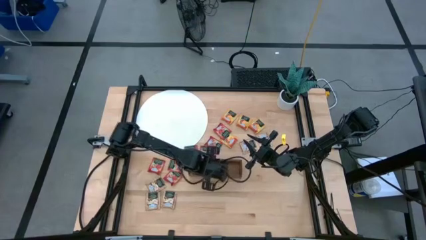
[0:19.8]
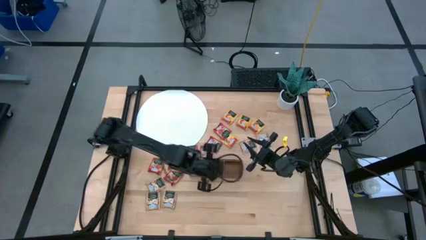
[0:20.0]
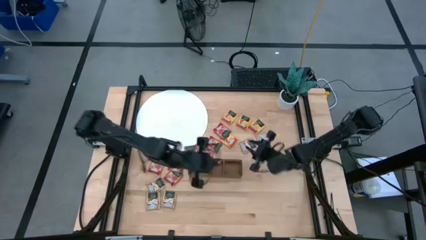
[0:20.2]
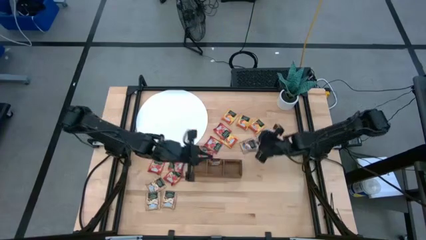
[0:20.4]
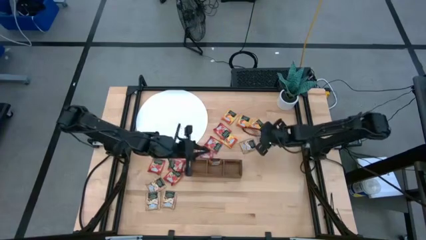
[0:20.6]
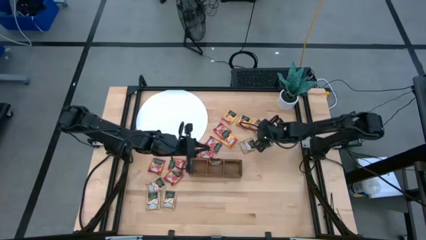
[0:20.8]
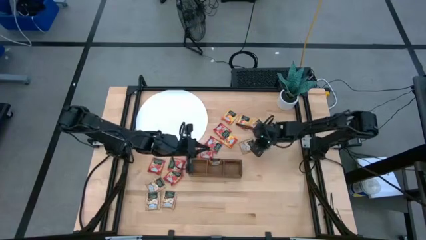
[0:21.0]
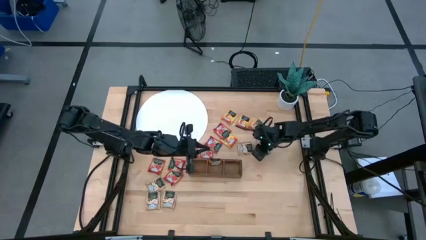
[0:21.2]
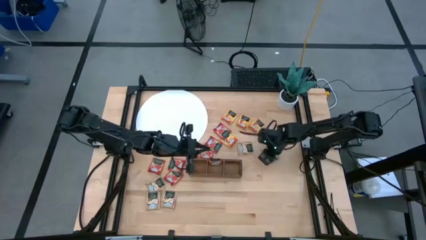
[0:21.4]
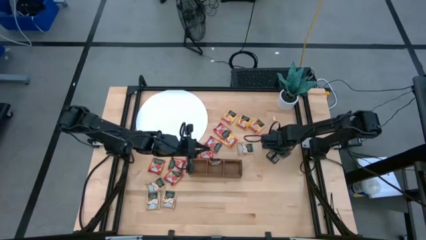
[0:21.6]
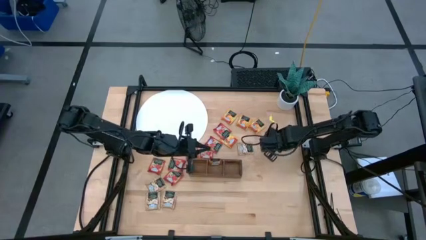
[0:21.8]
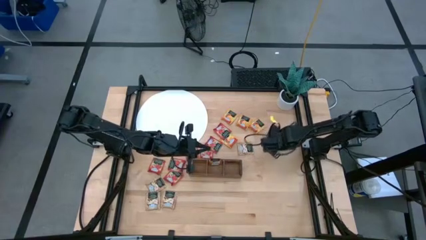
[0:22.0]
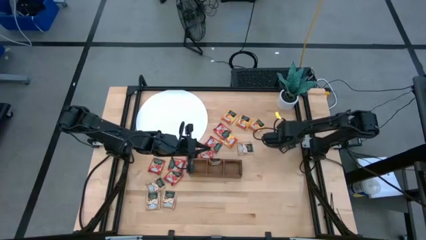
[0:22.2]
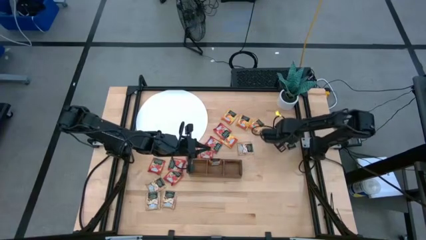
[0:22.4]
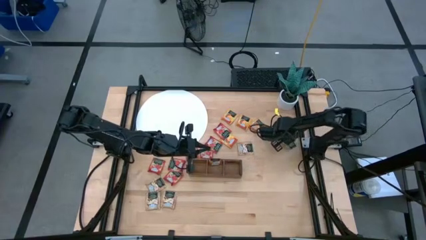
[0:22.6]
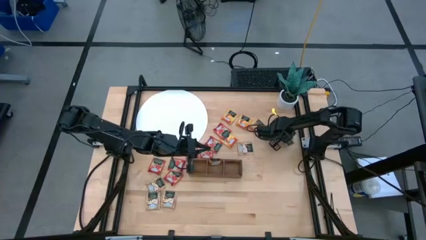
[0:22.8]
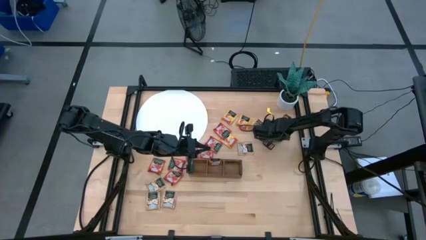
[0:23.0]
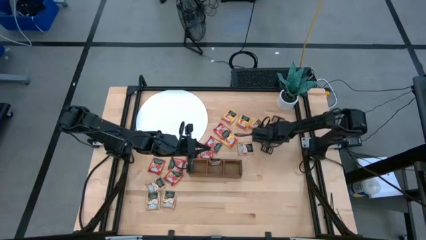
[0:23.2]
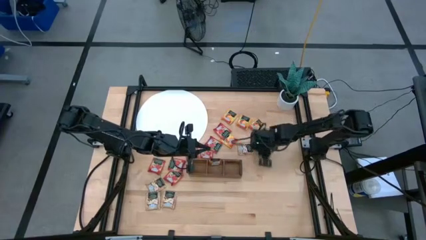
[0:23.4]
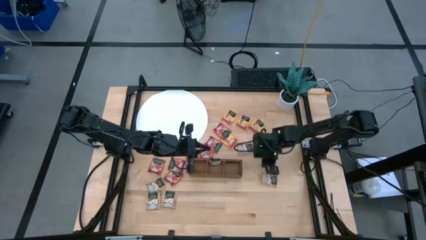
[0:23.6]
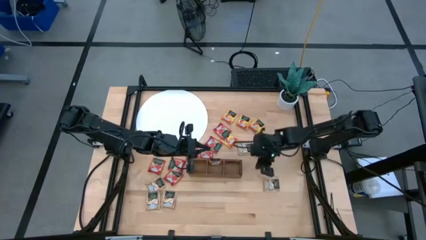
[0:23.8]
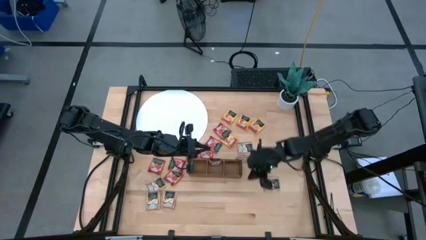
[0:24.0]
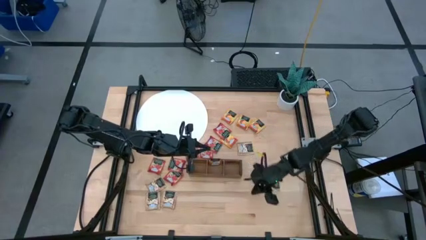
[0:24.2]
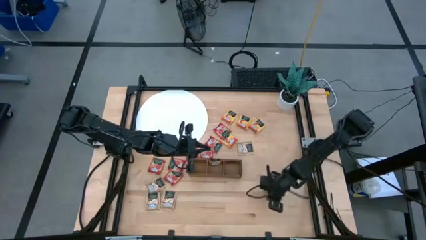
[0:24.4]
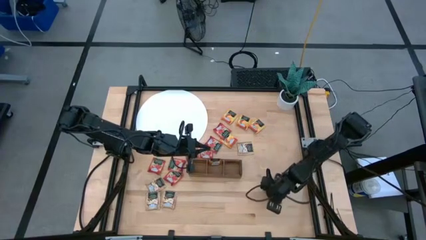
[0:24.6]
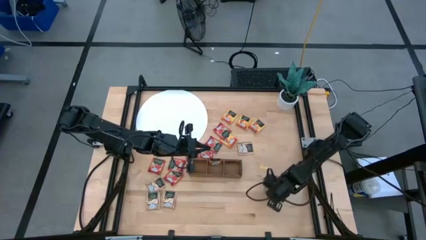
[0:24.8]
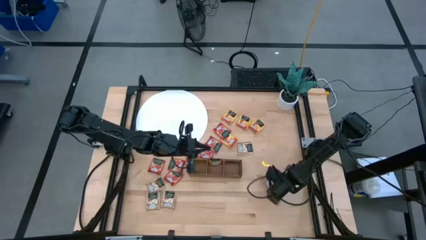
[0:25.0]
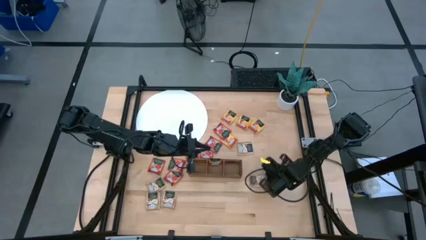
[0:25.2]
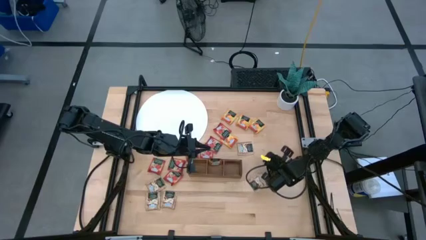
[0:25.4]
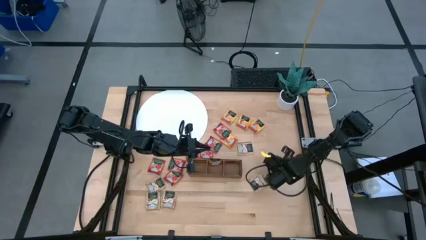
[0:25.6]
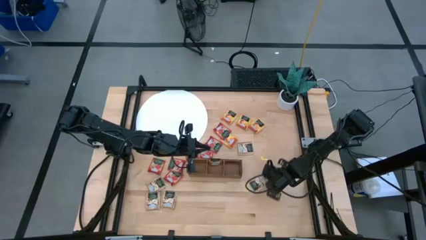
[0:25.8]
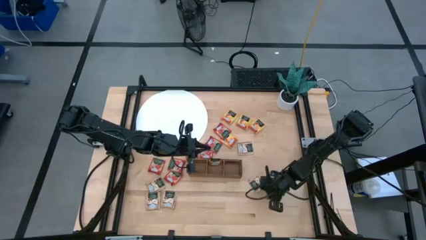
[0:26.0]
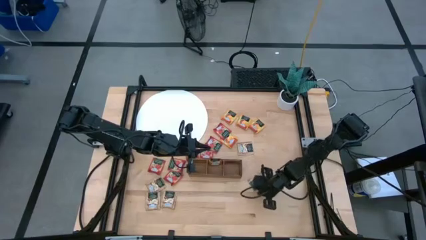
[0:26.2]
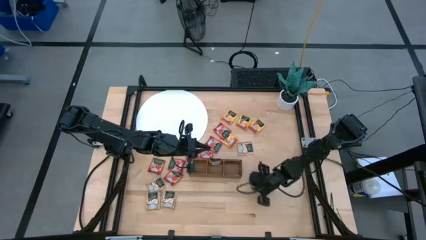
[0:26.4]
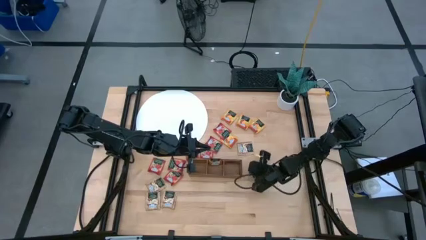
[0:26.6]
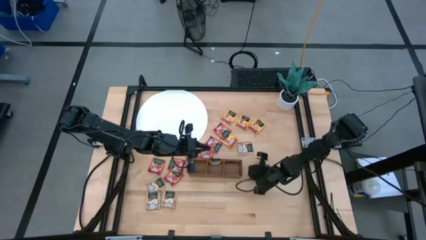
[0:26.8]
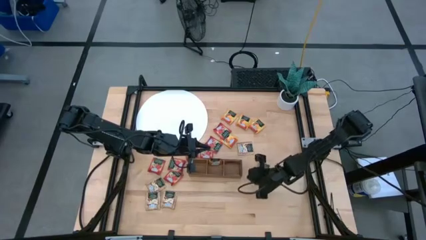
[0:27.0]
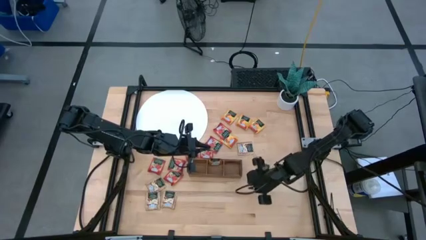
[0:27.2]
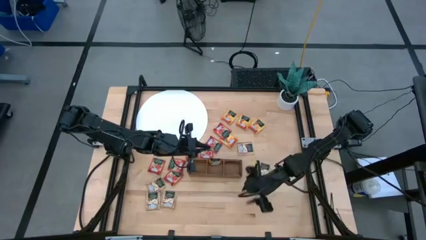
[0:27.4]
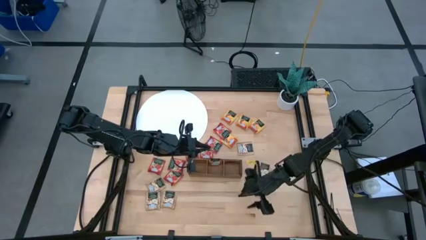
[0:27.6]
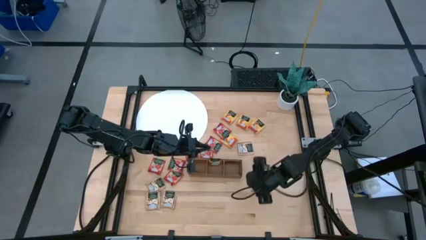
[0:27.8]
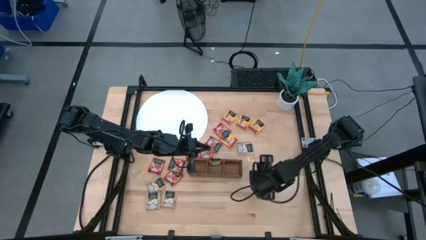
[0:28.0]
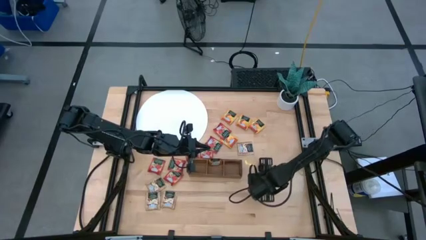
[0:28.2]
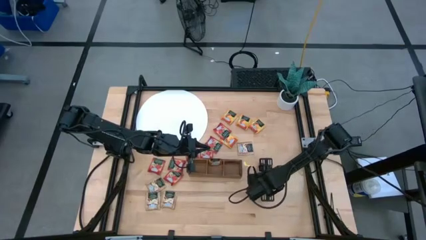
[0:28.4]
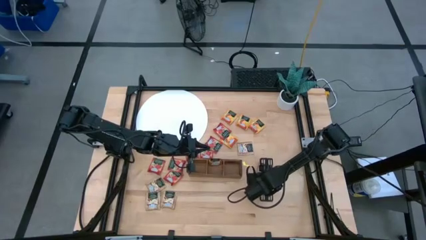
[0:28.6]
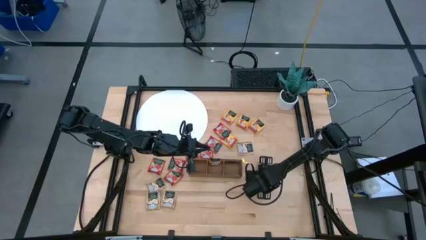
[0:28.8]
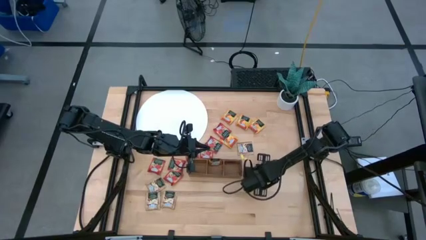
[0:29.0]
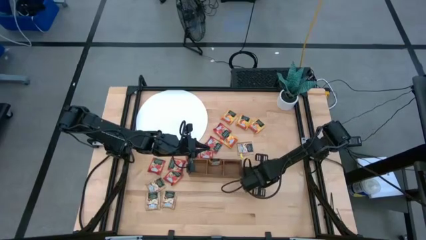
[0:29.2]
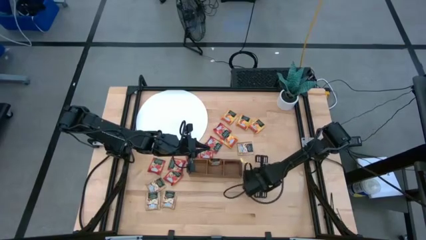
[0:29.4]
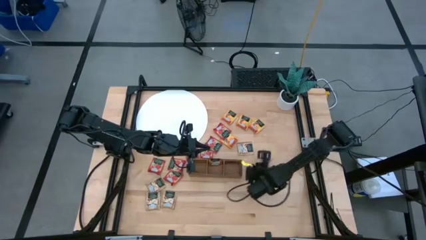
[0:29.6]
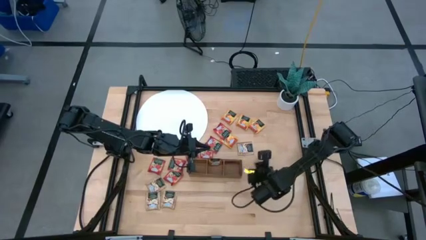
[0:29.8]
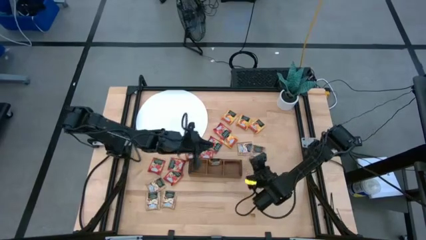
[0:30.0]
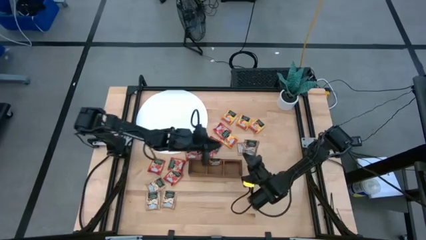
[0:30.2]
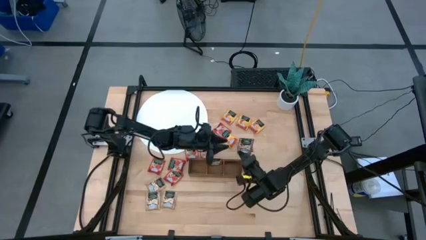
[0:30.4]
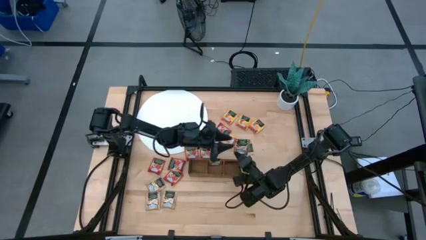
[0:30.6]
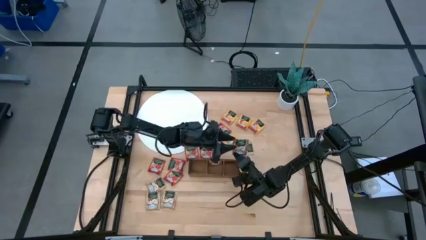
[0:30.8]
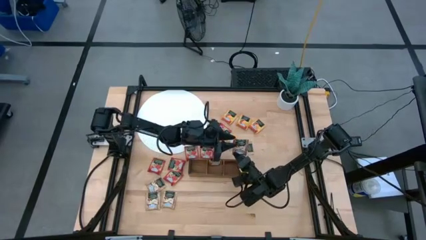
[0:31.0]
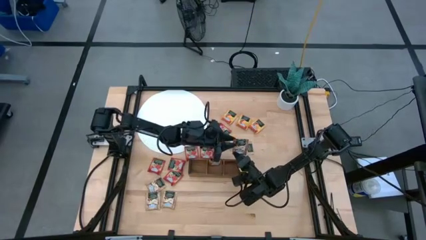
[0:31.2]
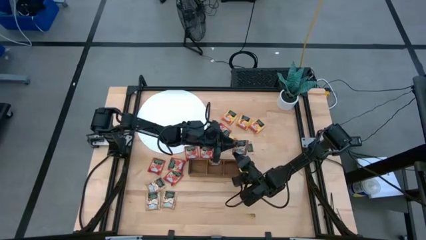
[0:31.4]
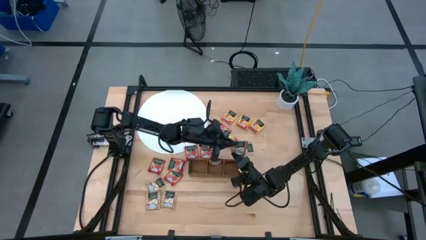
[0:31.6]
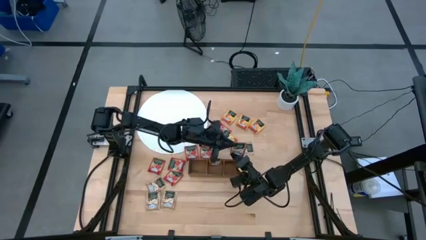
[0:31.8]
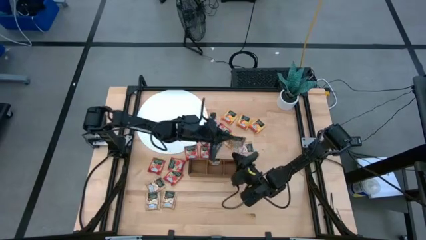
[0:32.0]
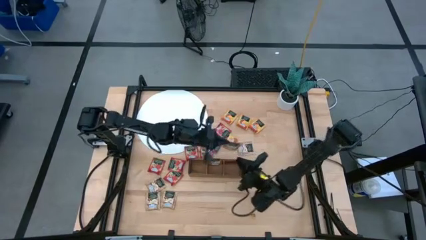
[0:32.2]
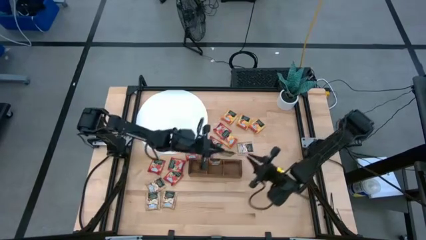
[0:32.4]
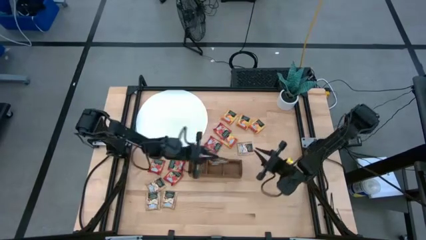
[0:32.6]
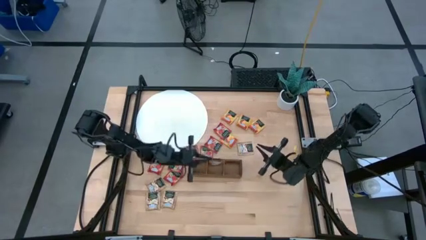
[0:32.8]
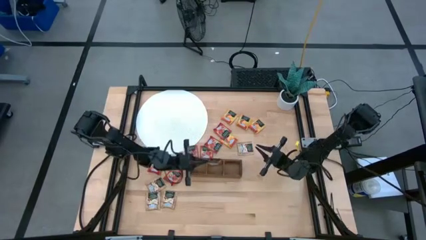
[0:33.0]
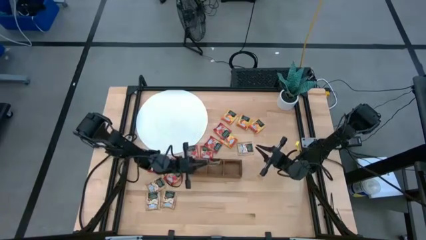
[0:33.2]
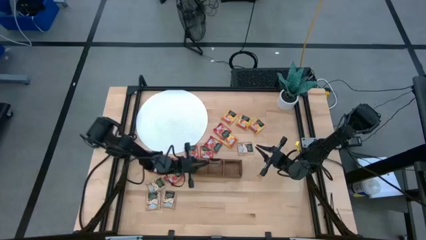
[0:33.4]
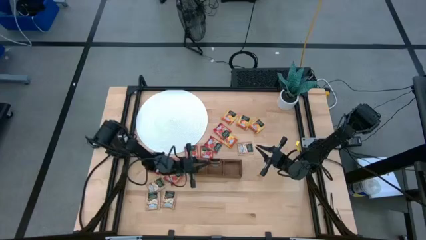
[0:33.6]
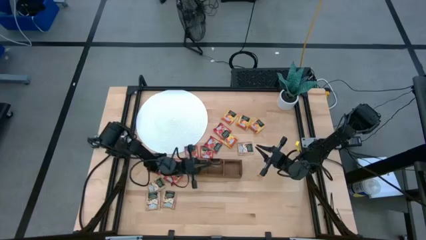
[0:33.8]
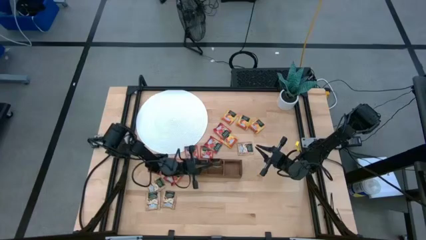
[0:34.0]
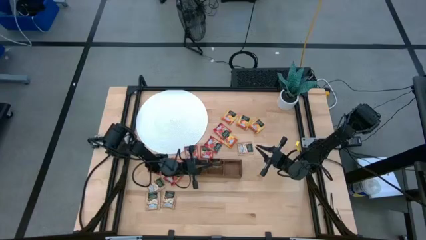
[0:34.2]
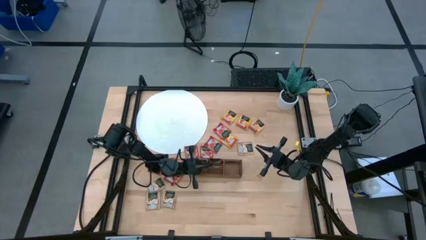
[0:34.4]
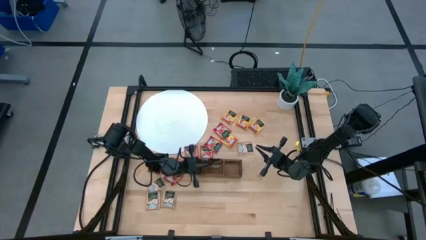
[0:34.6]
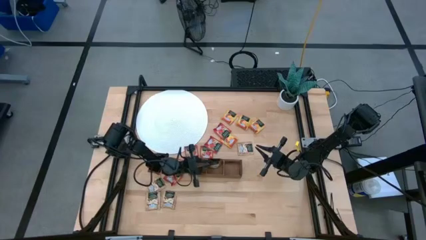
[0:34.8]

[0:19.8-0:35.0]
Task: Pick & Place Tea
Put the brown tea bag into the middle section of the wooden organizer
